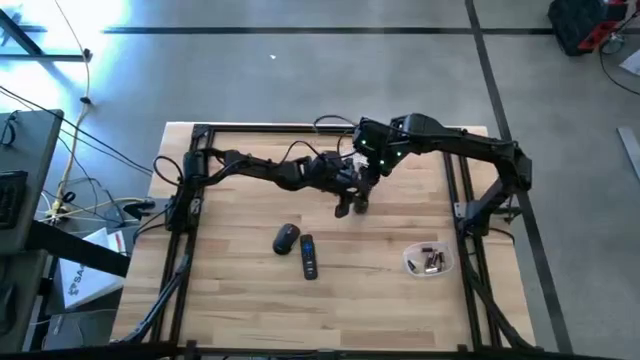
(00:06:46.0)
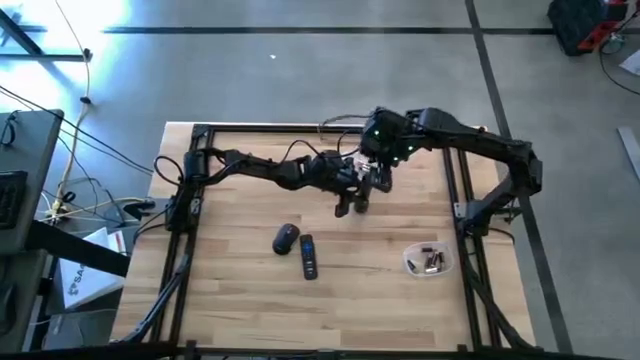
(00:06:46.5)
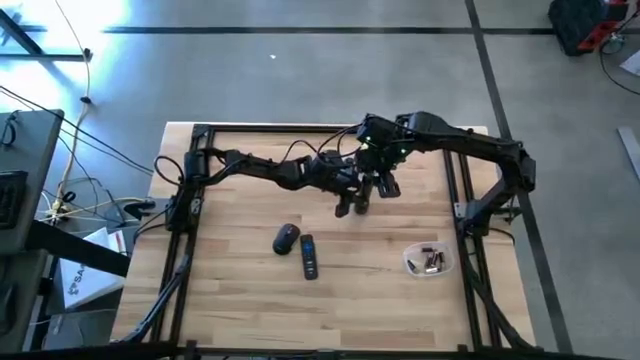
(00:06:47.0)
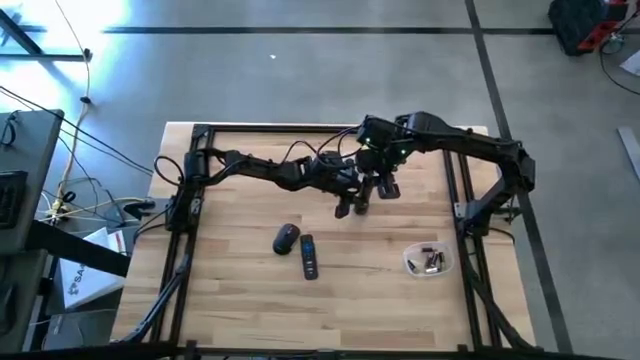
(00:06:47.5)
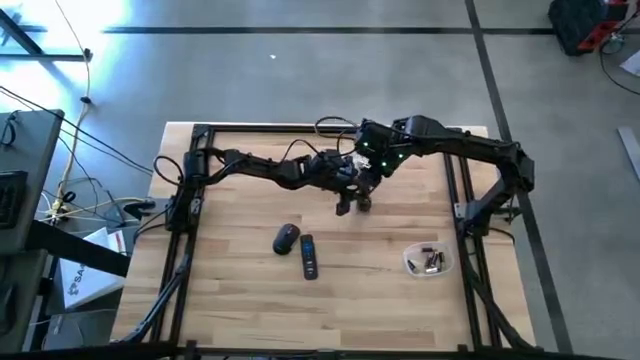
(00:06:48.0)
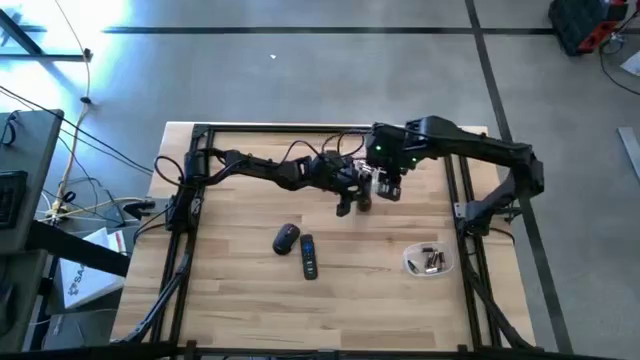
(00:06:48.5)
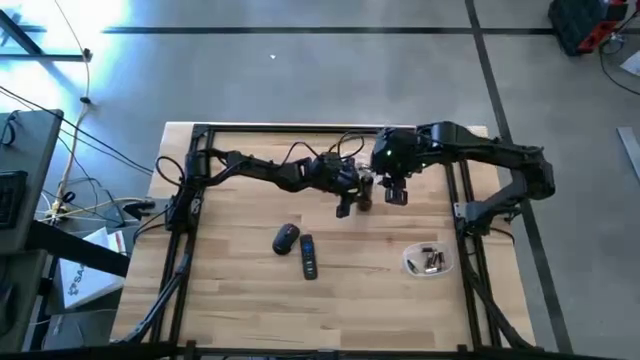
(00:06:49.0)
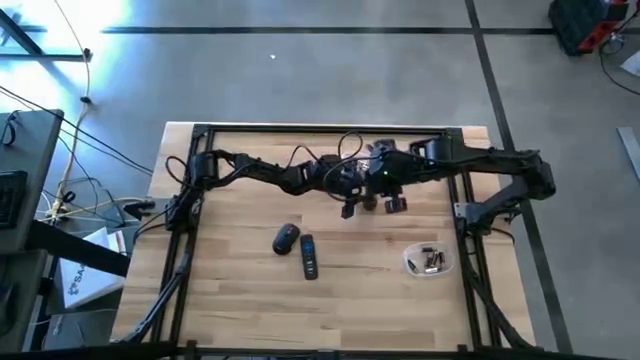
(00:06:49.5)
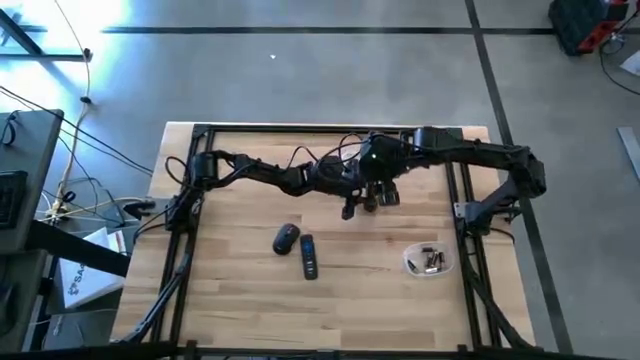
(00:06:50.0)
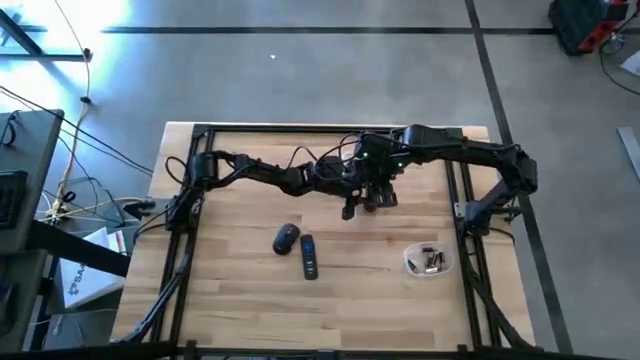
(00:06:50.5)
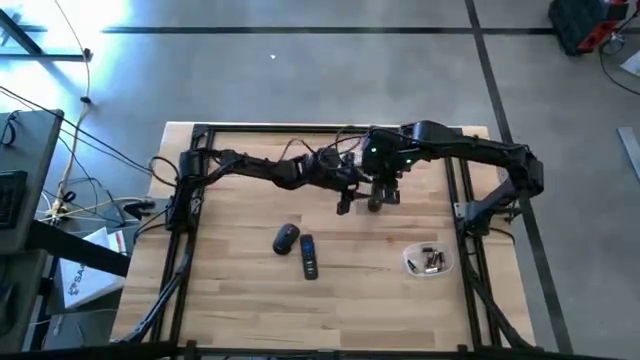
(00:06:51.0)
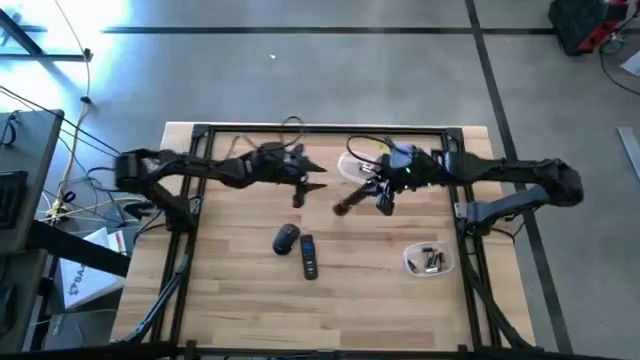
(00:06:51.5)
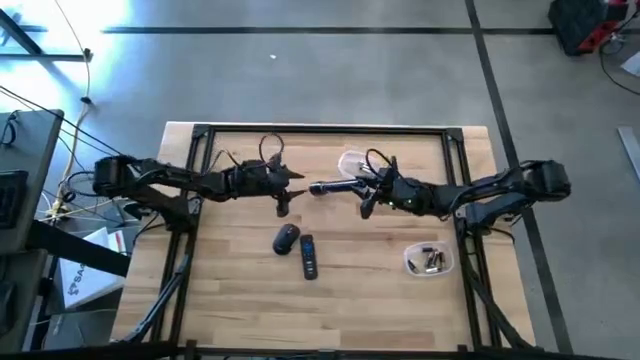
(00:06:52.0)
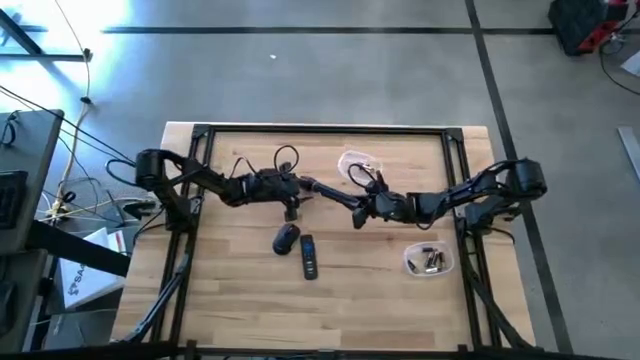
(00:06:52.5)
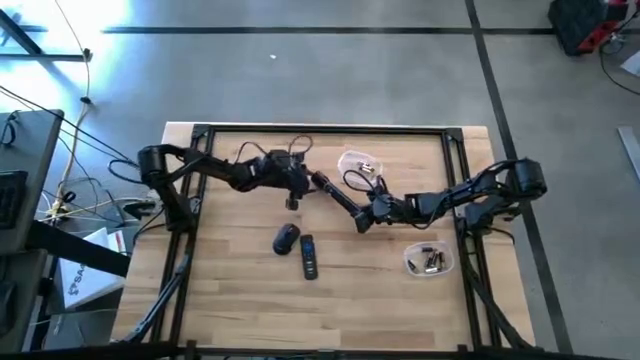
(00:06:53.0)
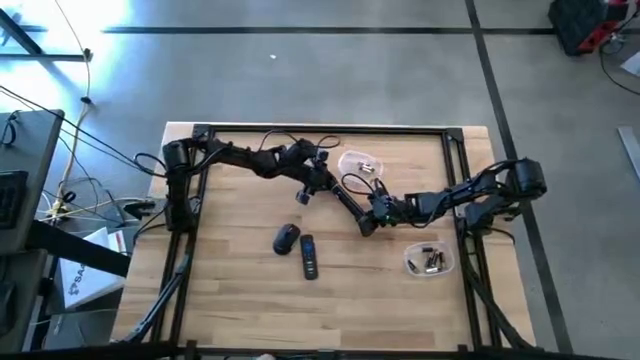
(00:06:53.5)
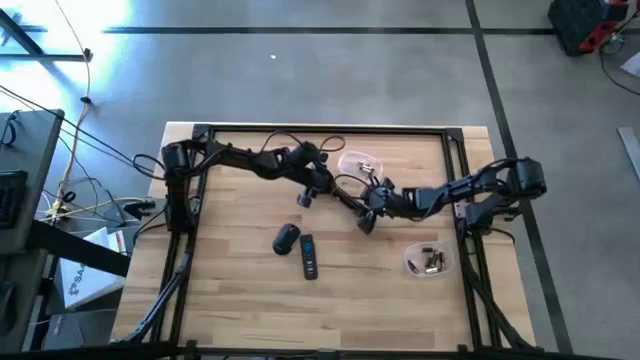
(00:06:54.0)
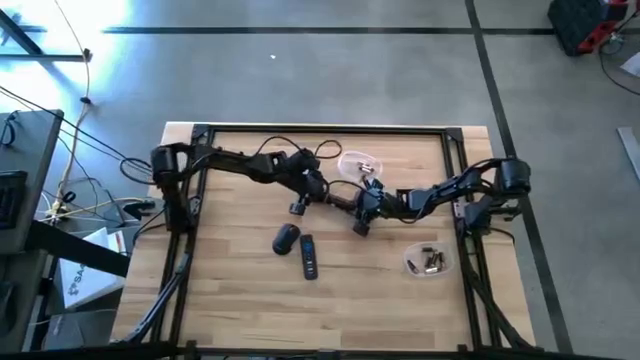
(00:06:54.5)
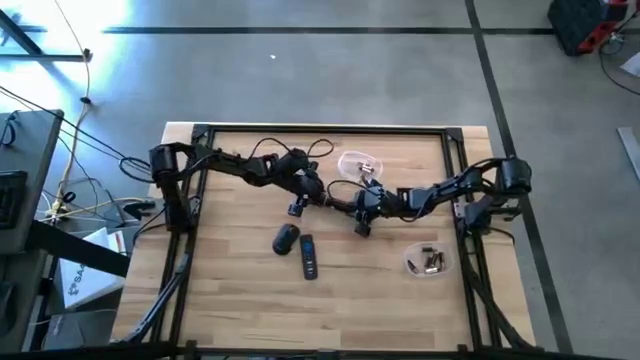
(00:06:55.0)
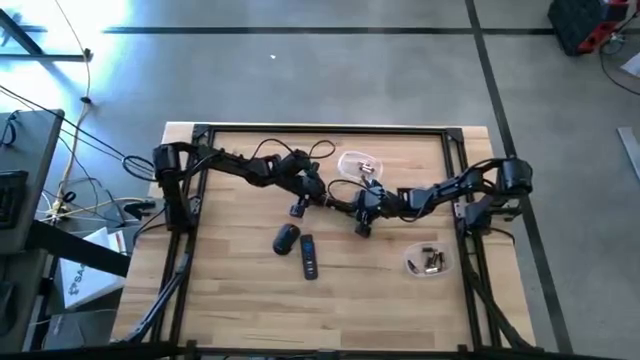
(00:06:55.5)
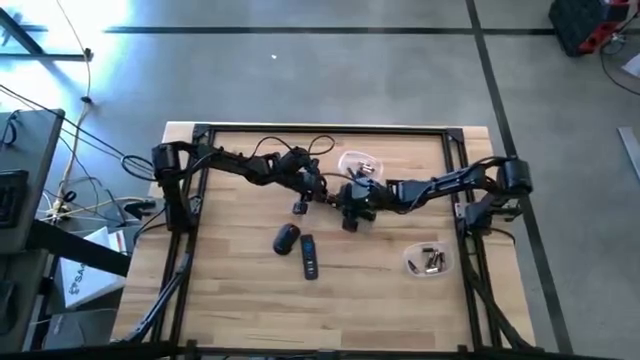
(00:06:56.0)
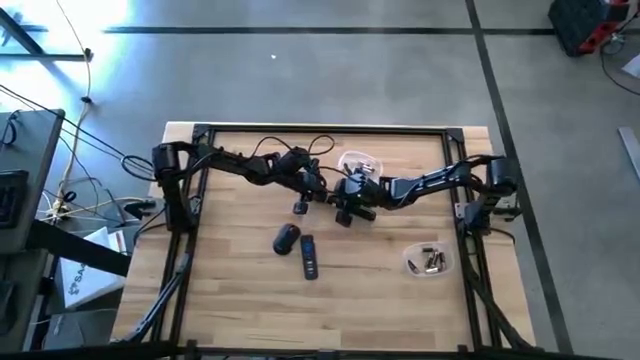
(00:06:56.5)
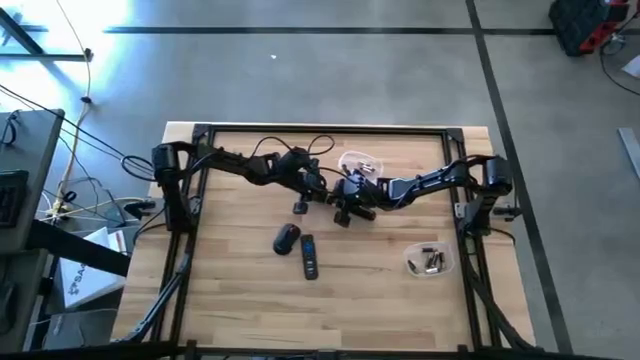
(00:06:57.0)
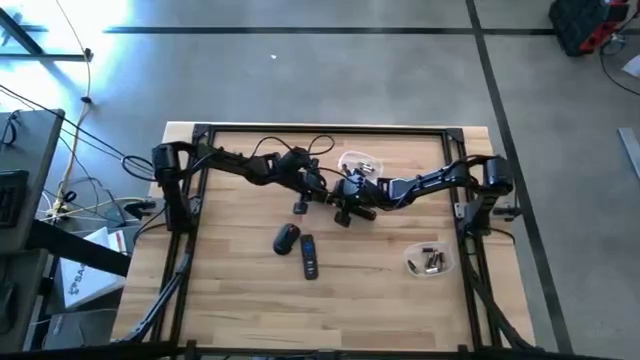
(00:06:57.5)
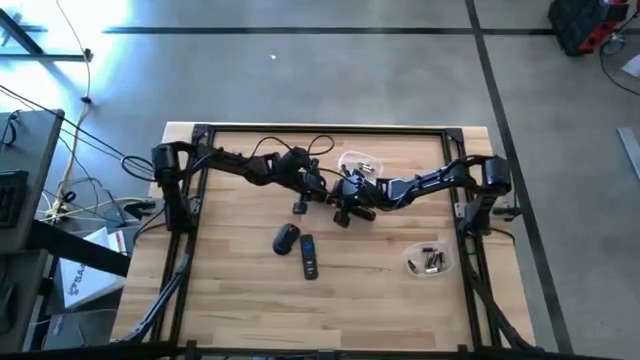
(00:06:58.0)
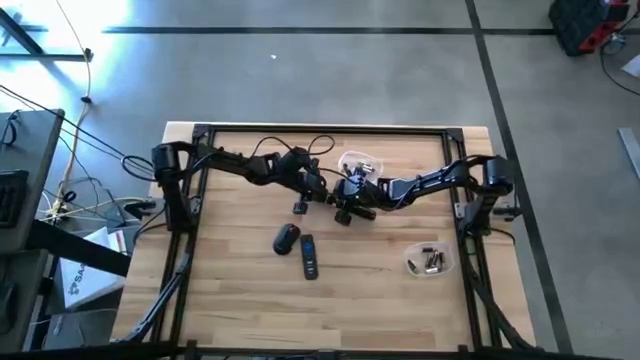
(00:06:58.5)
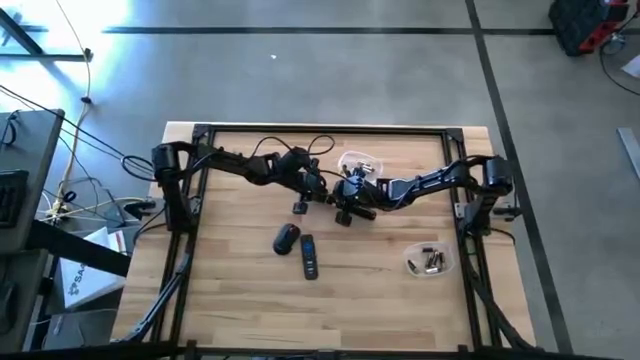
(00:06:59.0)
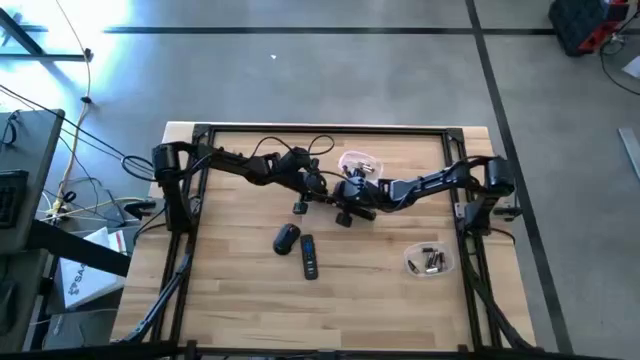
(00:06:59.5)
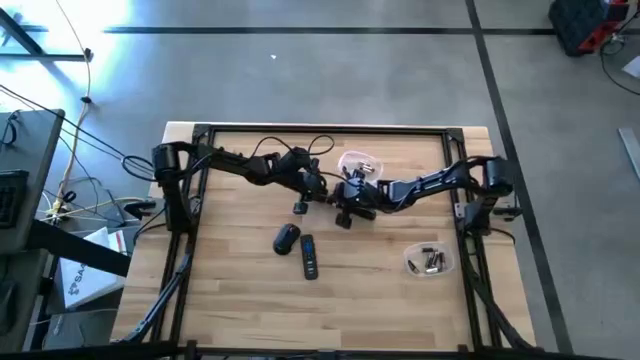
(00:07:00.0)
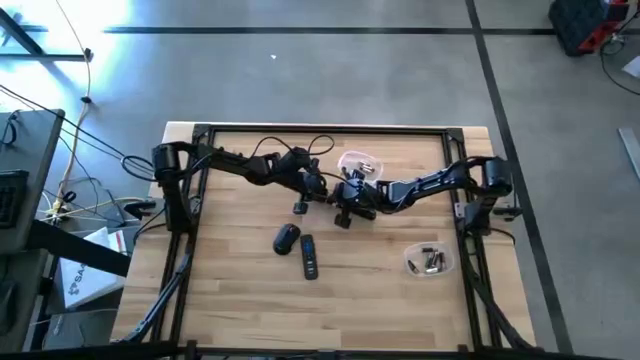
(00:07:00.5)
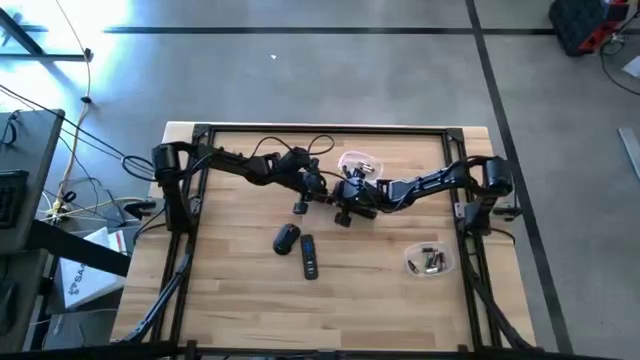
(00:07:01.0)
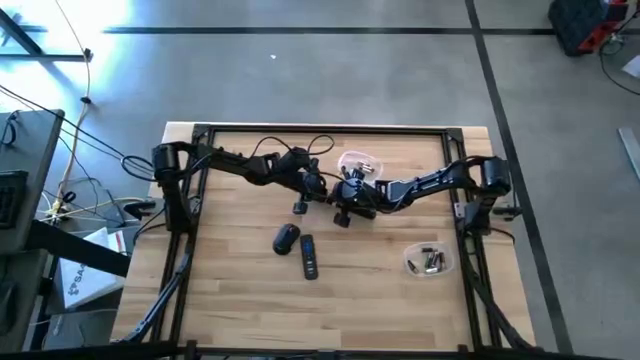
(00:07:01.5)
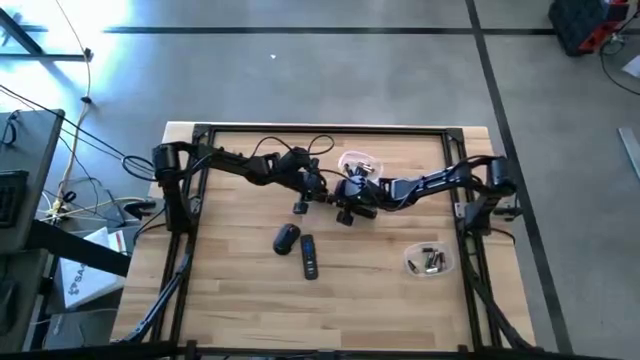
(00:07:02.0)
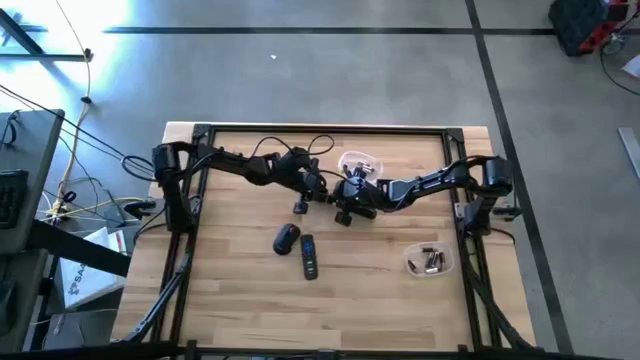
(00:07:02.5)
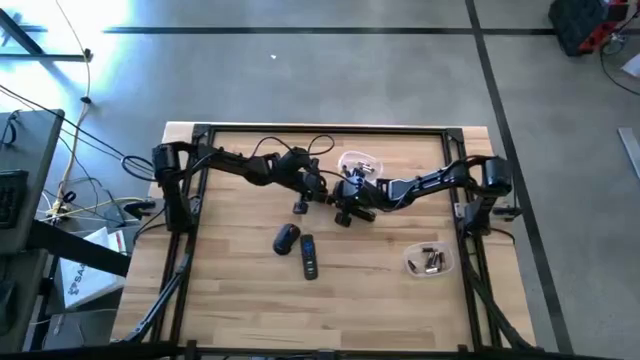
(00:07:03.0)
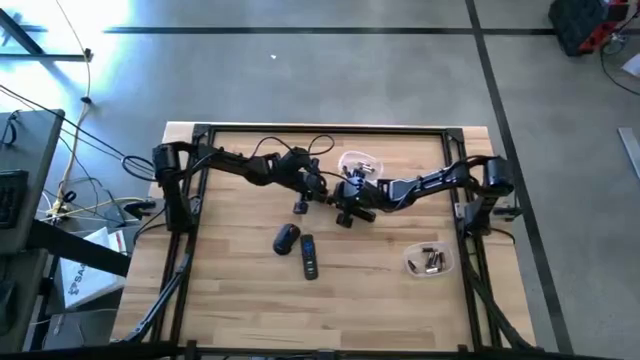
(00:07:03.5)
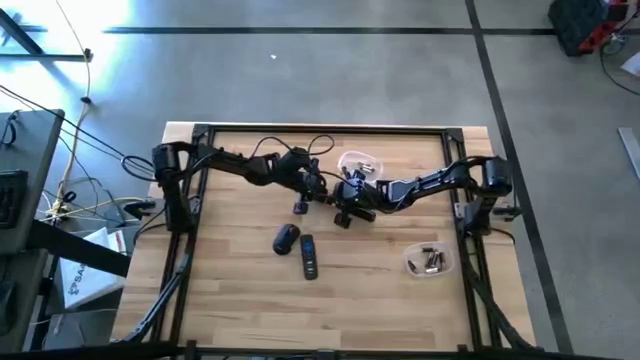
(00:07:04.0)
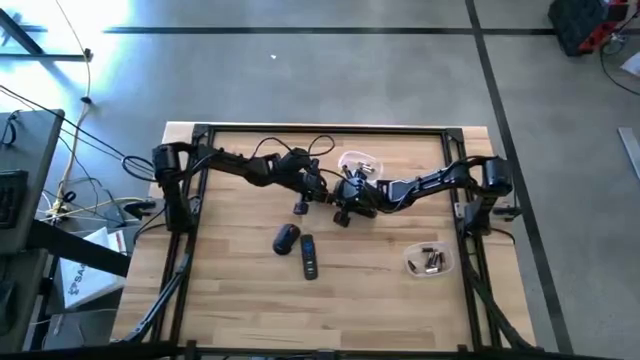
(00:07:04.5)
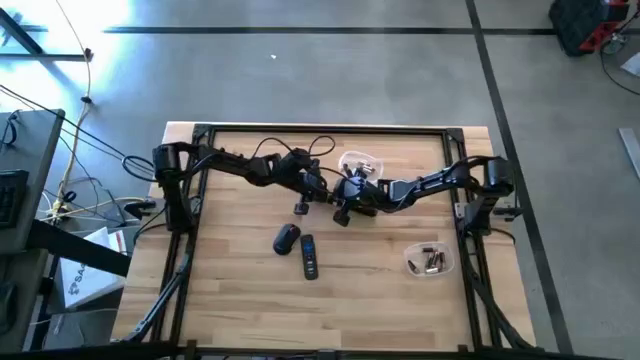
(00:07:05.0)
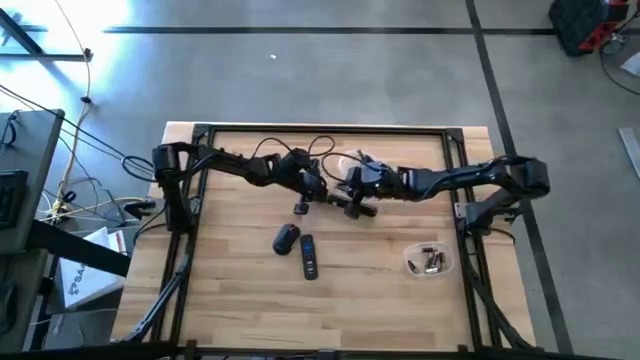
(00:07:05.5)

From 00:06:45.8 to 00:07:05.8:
Task: Insert battery
Close the flashlight using its cover
